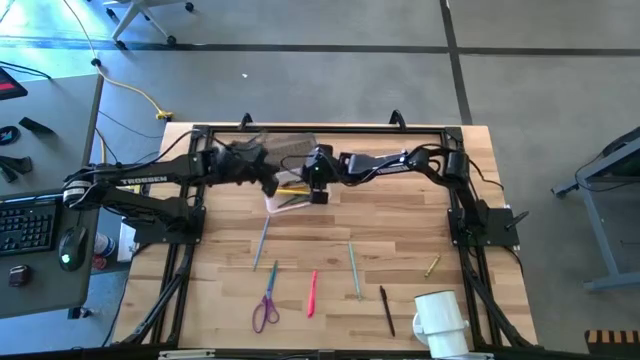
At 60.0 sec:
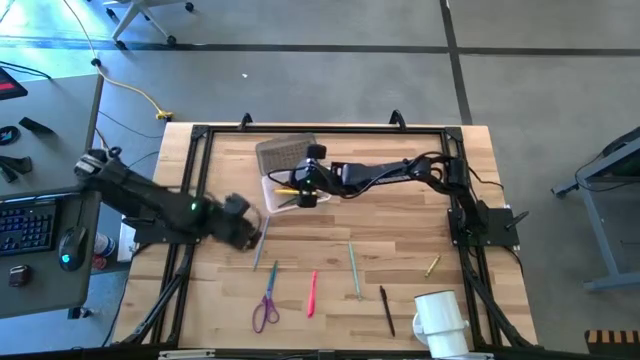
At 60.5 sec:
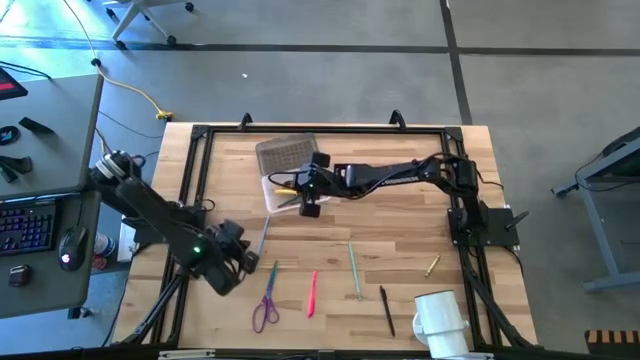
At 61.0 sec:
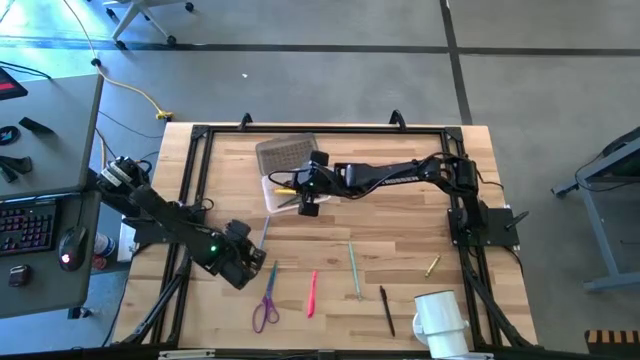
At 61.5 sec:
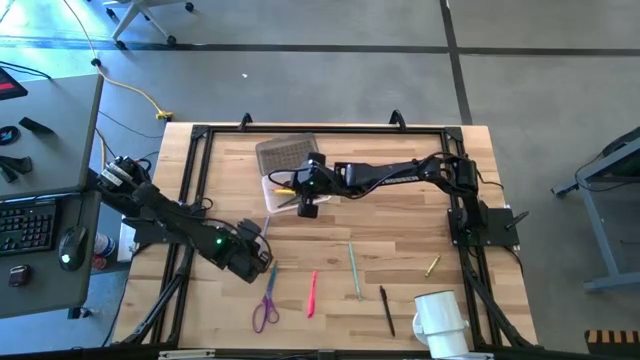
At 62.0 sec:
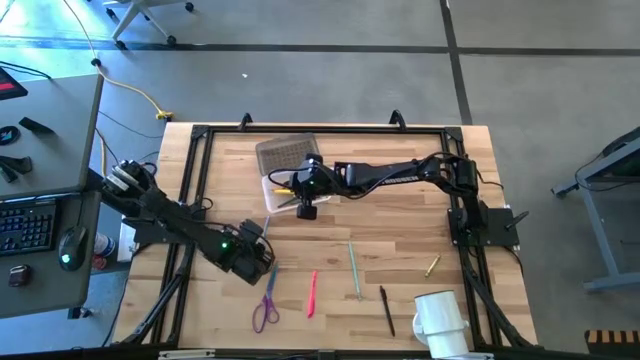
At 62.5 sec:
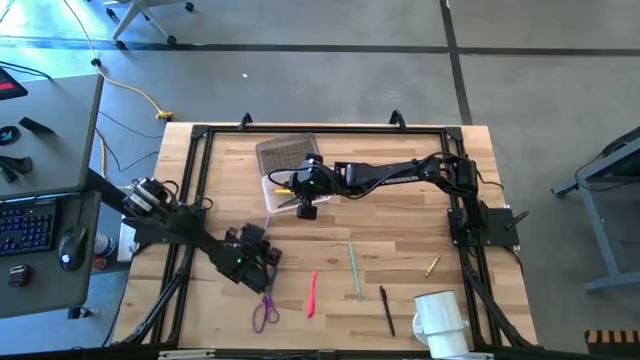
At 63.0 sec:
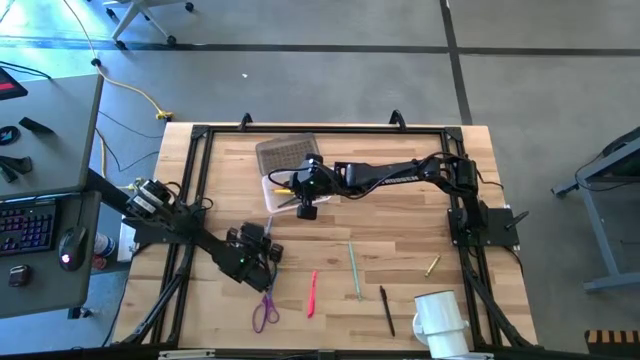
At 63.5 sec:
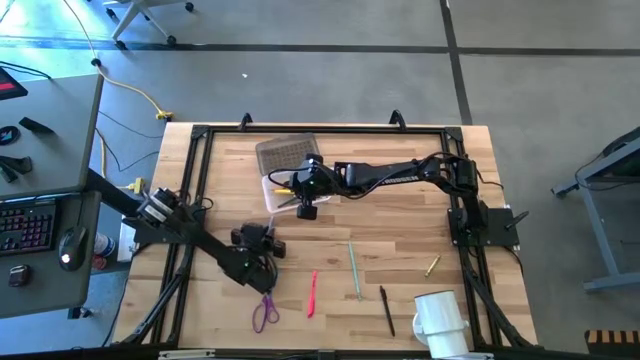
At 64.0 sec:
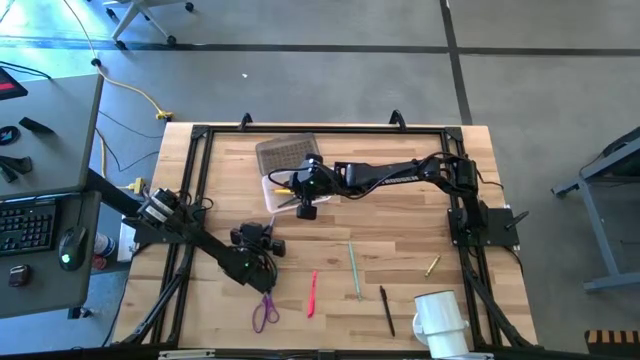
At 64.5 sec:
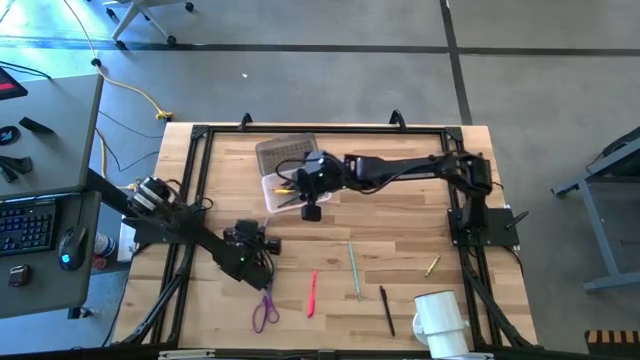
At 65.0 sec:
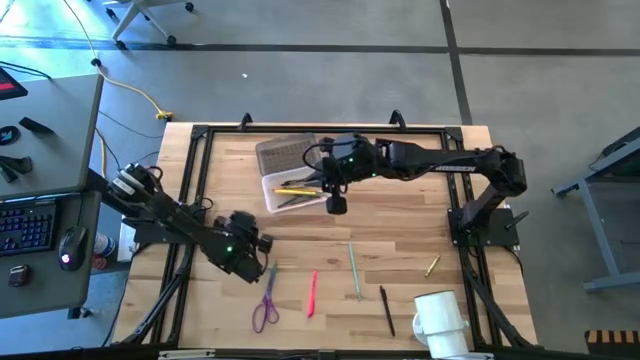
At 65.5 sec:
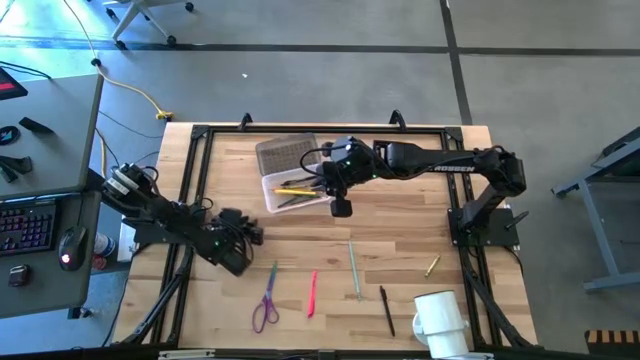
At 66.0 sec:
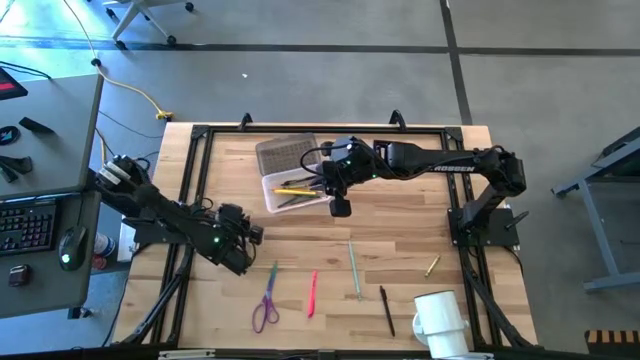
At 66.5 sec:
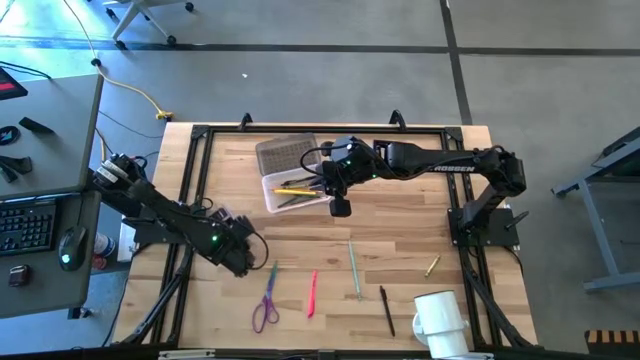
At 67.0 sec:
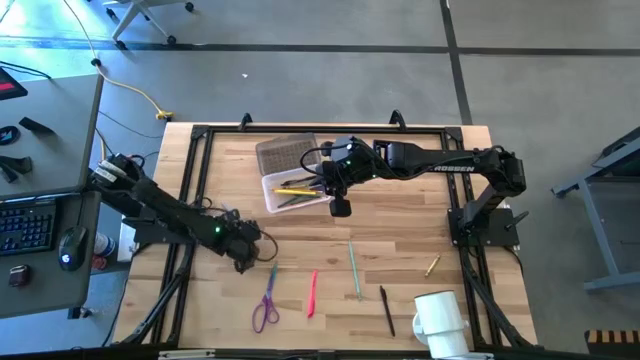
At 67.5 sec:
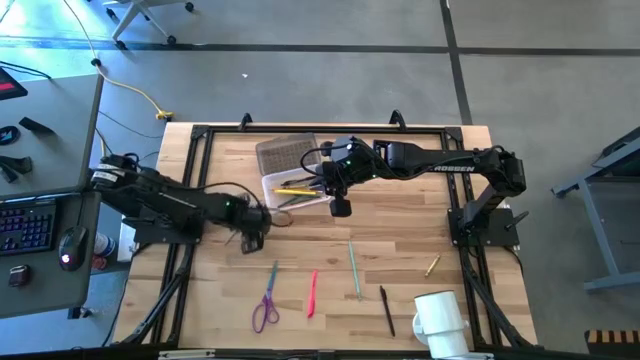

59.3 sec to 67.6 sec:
Task: Pick & place school supplies into a supply box
Put the blue colored pencil into the transparent supply box

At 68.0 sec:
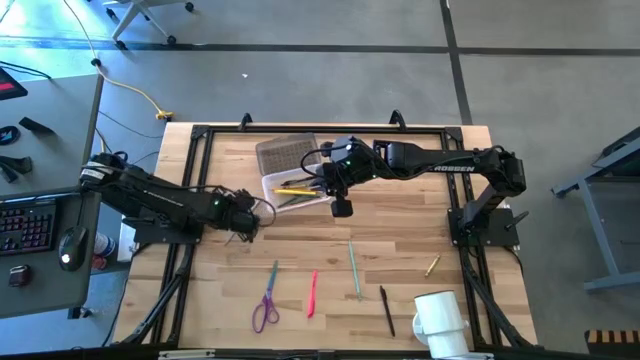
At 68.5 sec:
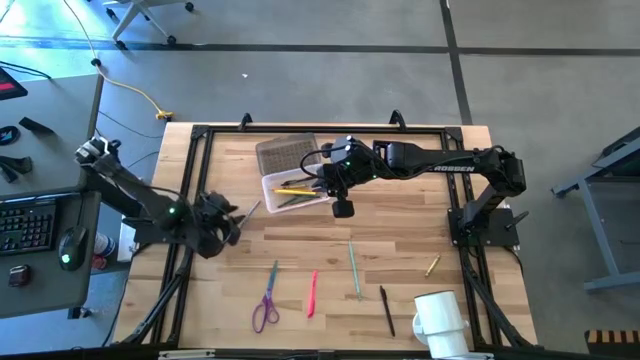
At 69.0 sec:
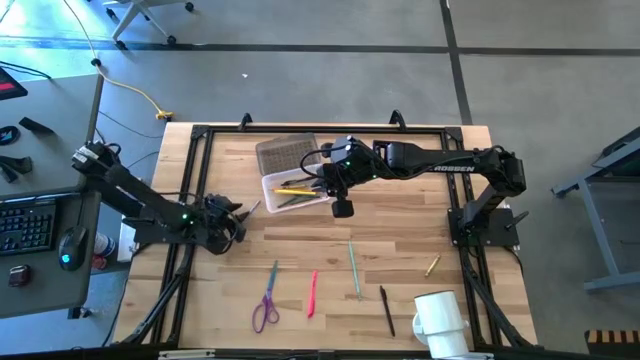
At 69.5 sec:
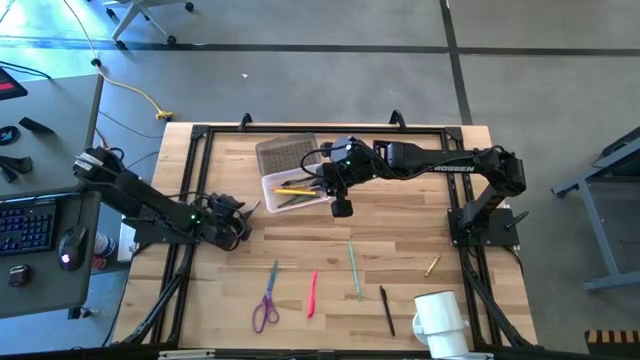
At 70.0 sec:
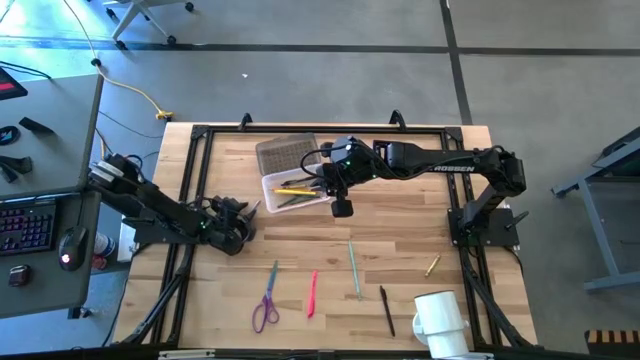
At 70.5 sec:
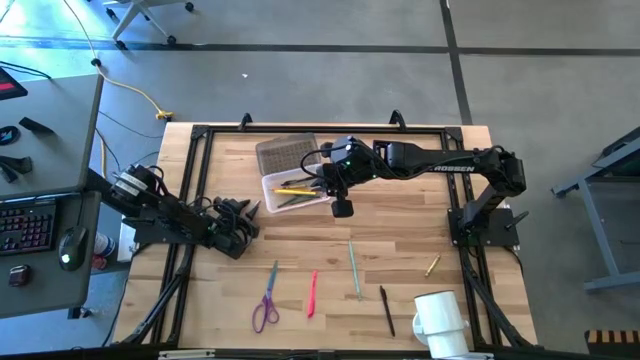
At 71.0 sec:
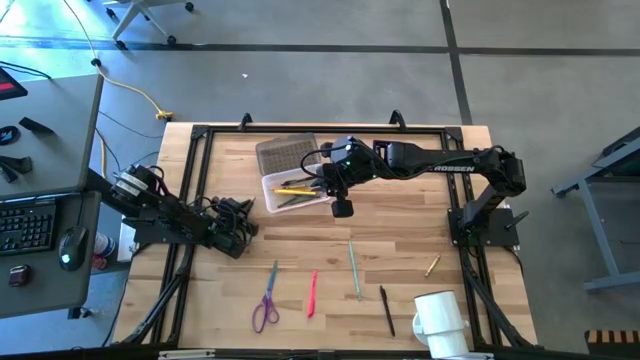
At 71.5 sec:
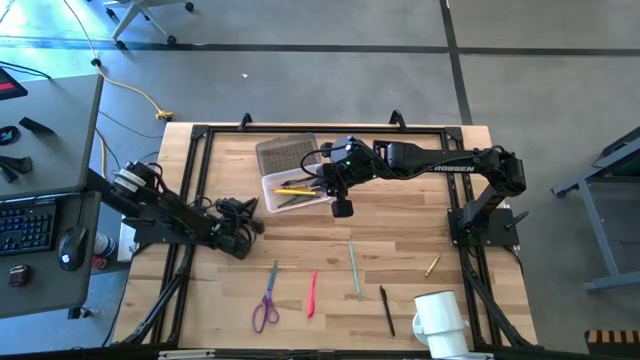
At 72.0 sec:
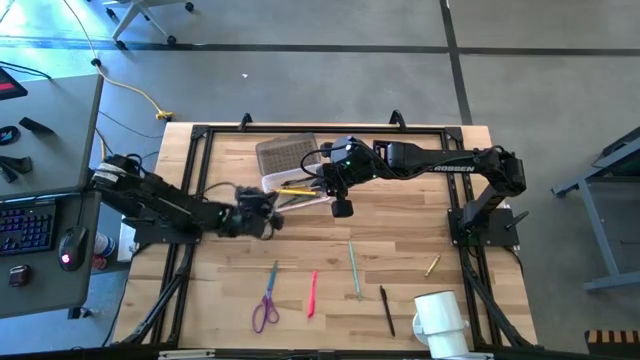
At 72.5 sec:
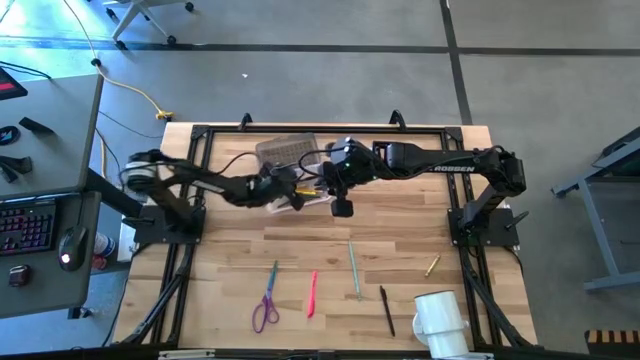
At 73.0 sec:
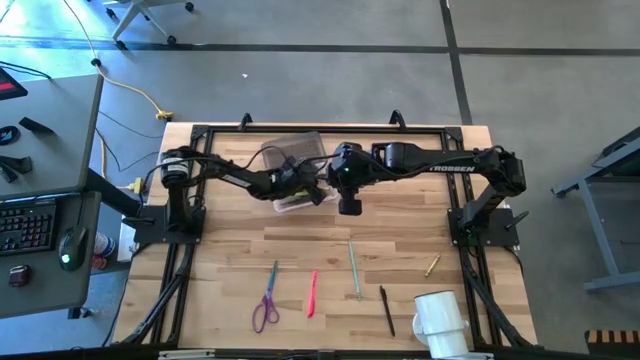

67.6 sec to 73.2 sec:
Put the blue colored pencil into the transparent supply box

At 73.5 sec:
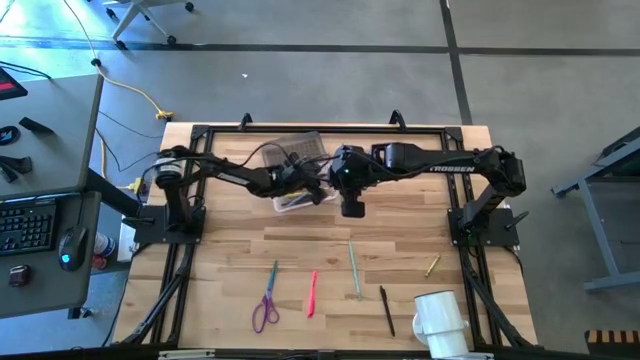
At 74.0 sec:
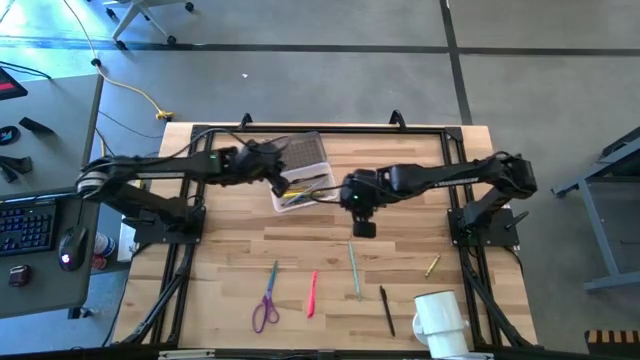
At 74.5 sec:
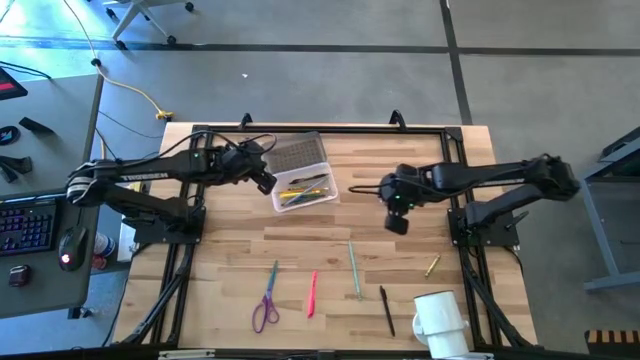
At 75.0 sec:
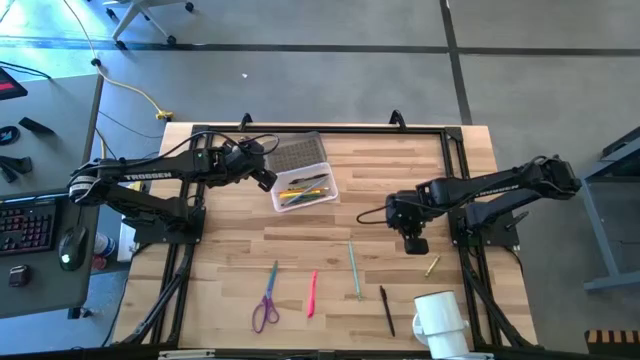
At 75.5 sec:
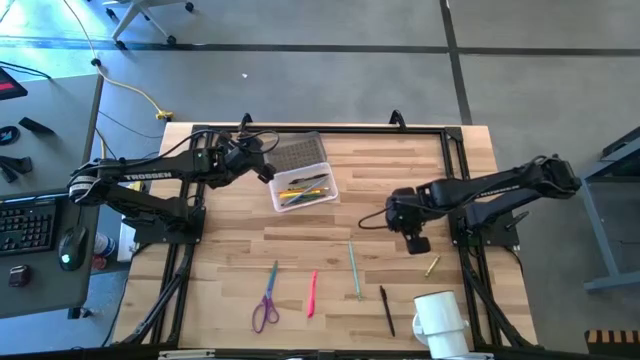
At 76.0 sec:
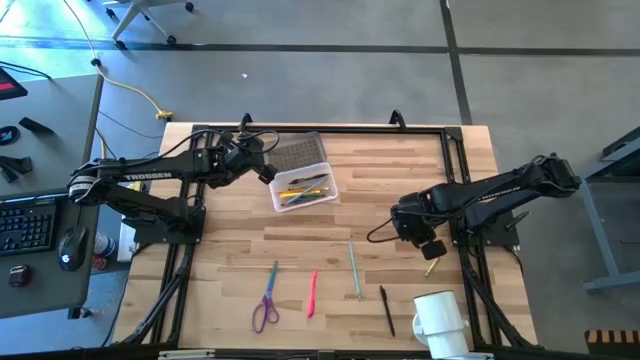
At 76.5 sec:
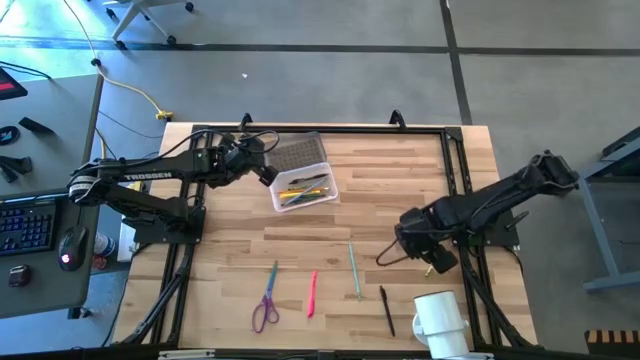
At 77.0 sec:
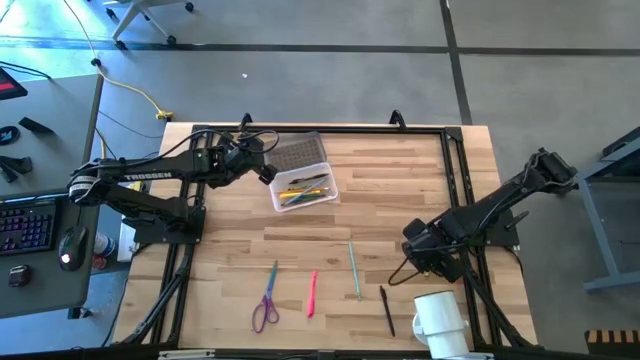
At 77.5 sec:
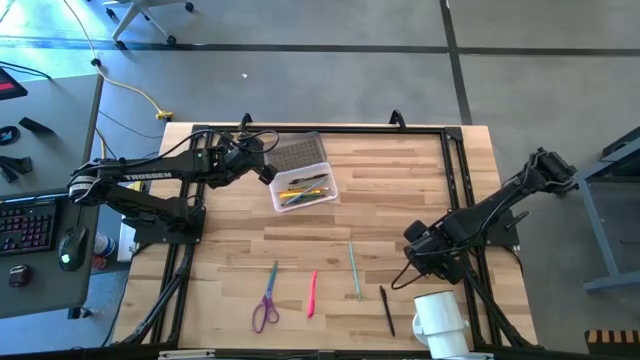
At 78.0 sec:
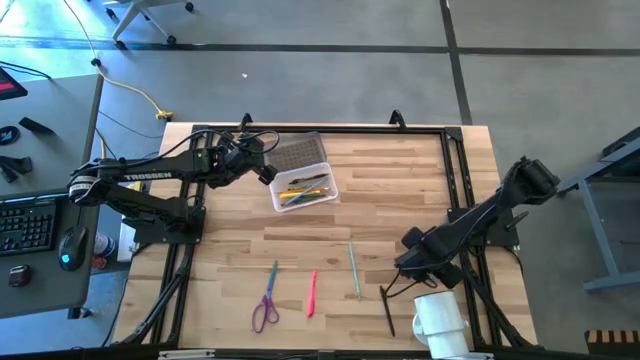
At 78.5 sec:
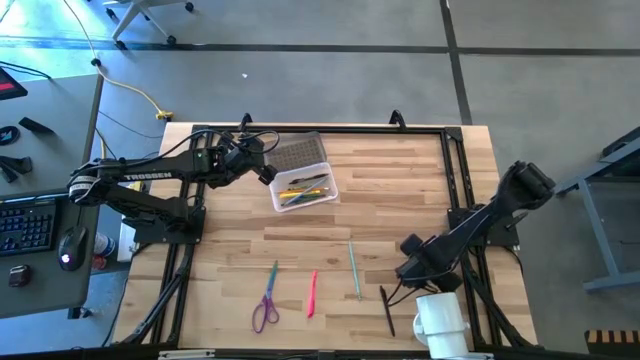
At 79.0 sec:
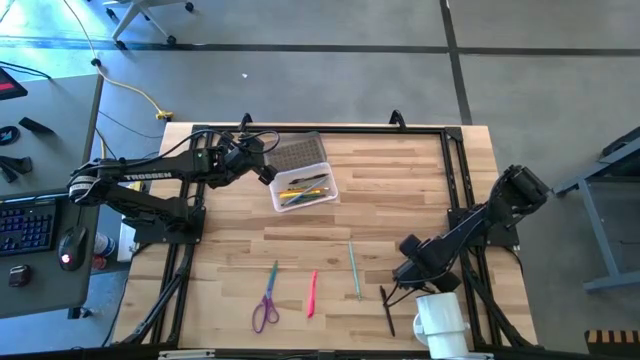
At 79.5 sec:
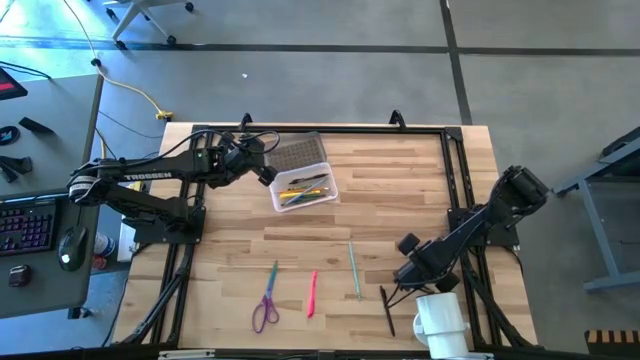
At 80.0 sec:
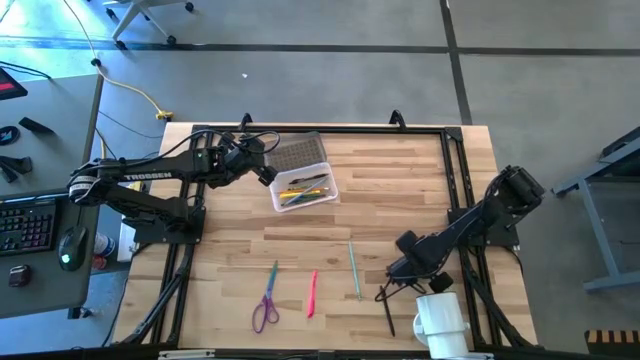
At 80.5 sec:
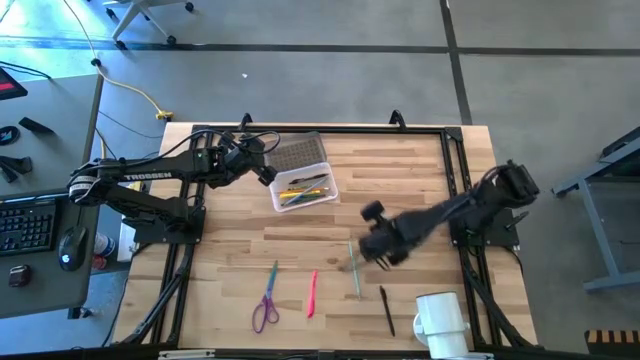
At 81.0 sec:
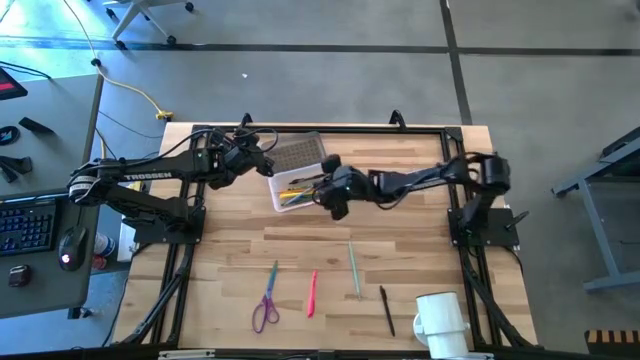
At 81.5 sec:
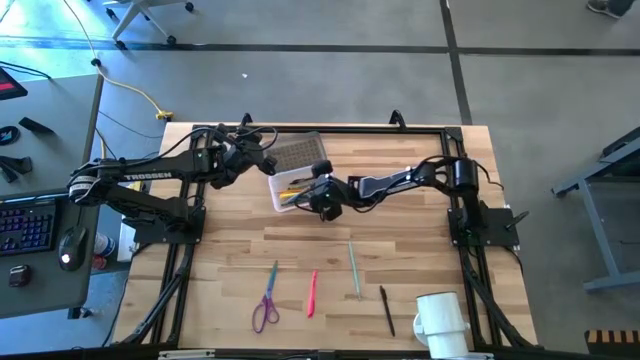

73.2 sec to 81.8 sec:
Put the light green crayon into the transparent supply box
